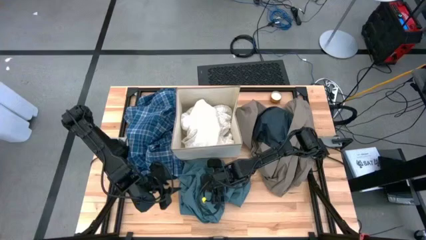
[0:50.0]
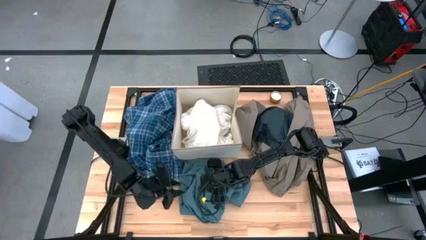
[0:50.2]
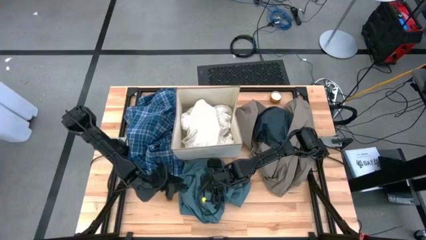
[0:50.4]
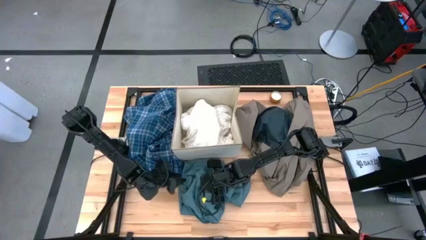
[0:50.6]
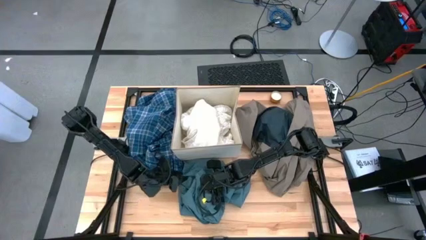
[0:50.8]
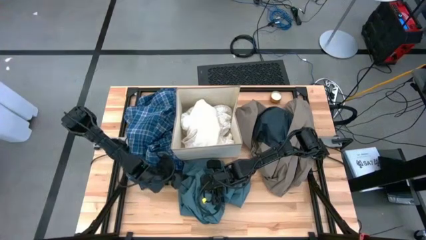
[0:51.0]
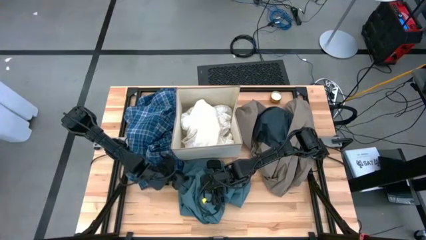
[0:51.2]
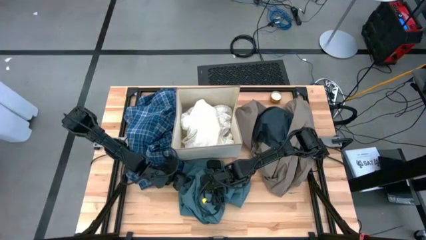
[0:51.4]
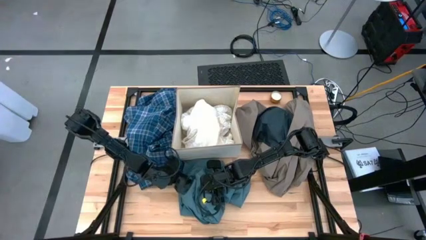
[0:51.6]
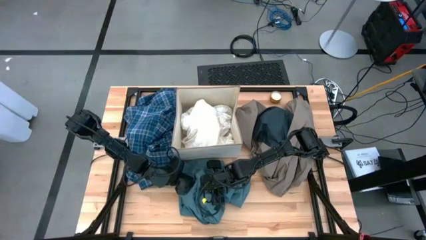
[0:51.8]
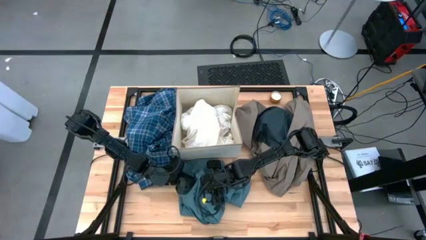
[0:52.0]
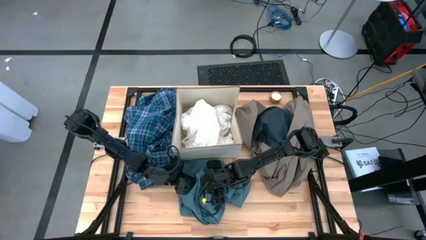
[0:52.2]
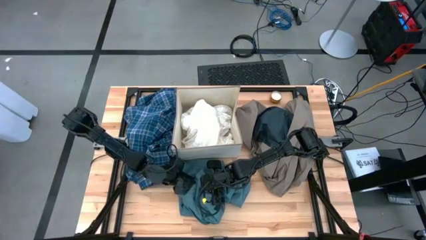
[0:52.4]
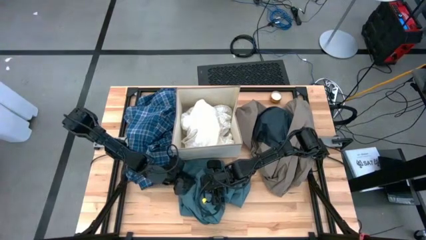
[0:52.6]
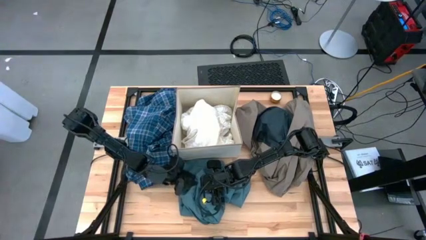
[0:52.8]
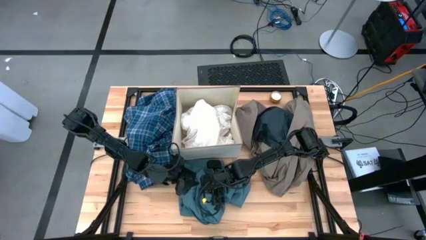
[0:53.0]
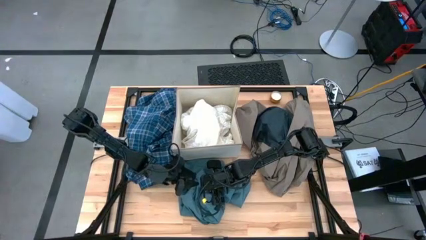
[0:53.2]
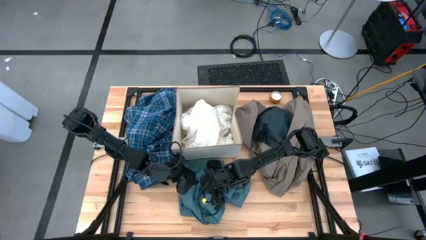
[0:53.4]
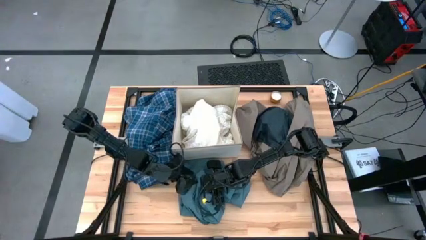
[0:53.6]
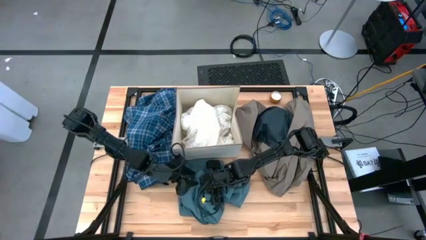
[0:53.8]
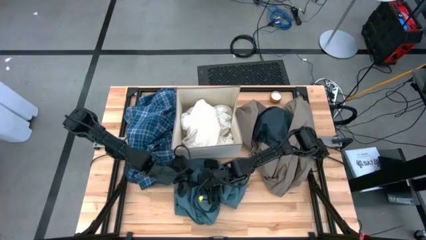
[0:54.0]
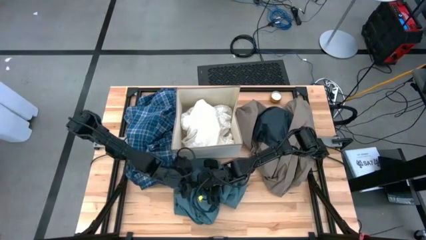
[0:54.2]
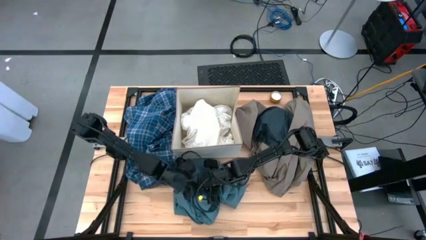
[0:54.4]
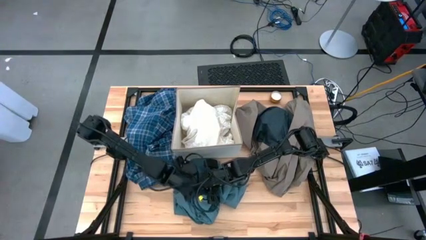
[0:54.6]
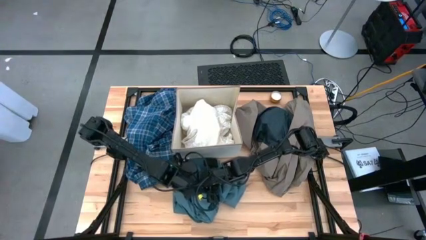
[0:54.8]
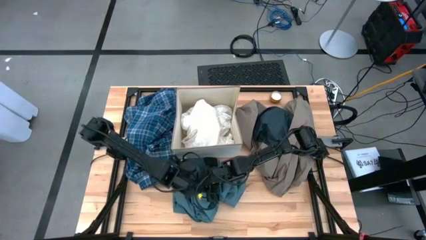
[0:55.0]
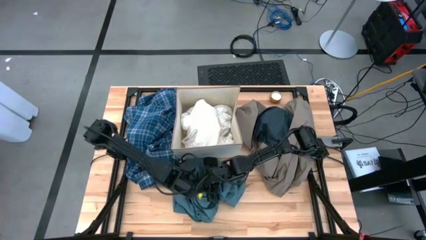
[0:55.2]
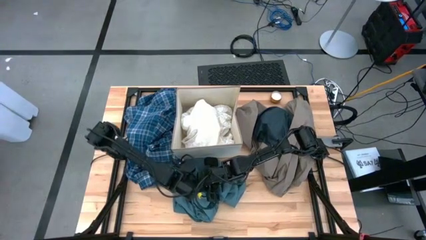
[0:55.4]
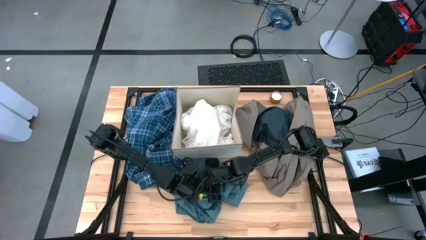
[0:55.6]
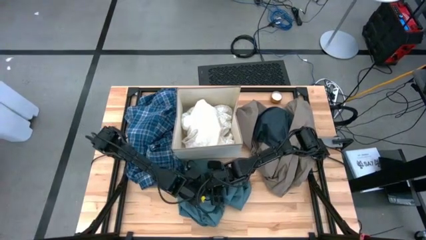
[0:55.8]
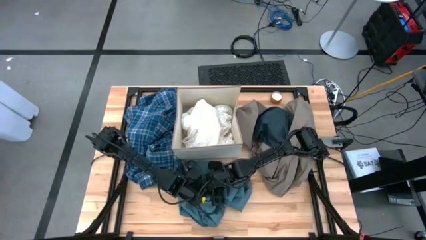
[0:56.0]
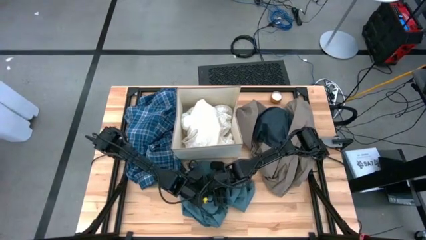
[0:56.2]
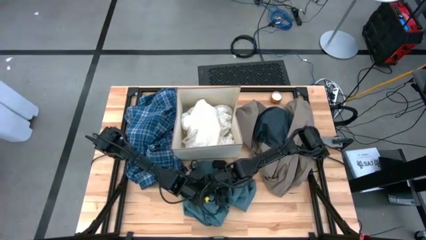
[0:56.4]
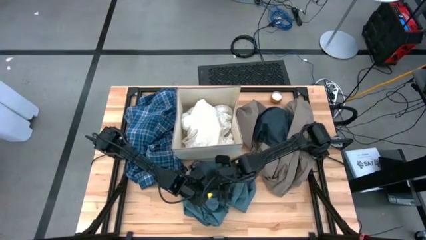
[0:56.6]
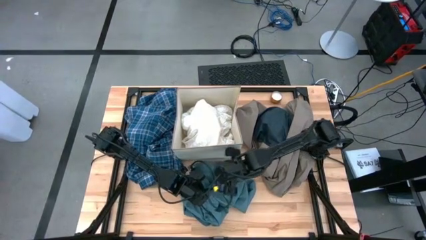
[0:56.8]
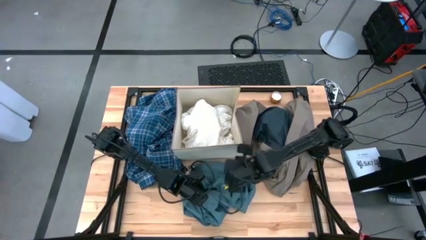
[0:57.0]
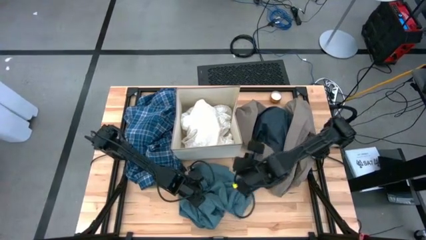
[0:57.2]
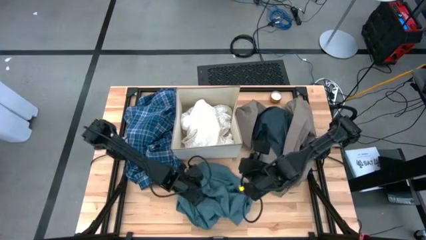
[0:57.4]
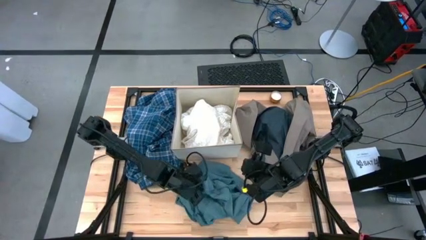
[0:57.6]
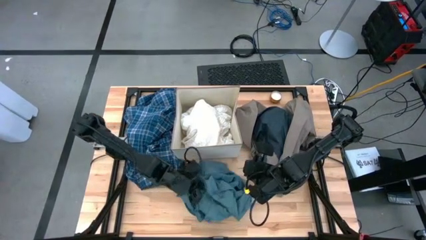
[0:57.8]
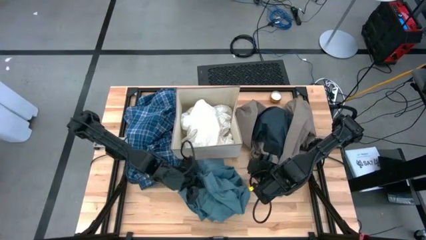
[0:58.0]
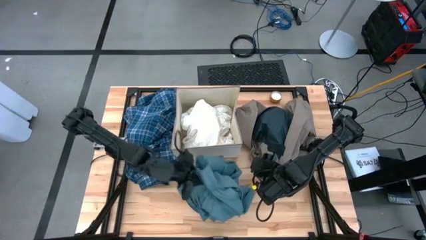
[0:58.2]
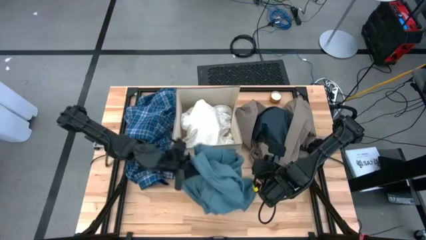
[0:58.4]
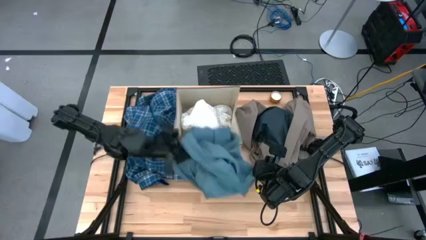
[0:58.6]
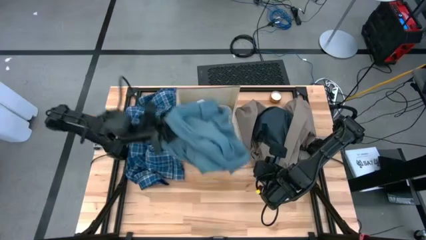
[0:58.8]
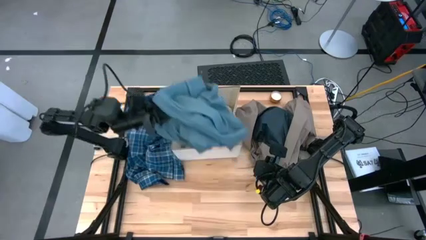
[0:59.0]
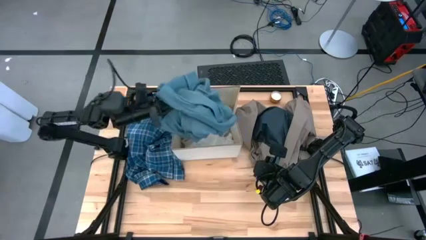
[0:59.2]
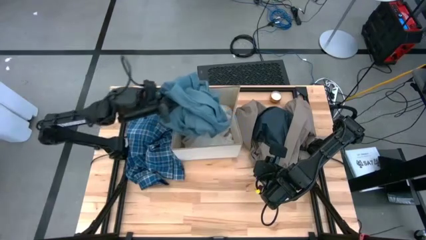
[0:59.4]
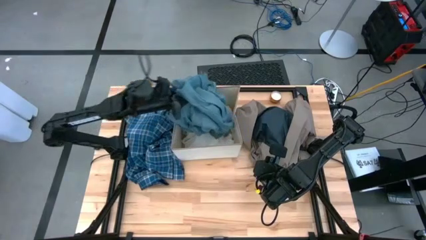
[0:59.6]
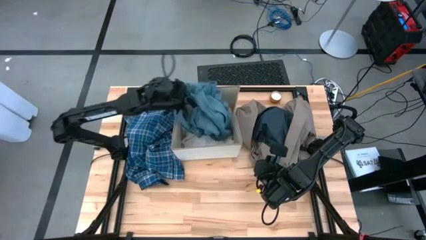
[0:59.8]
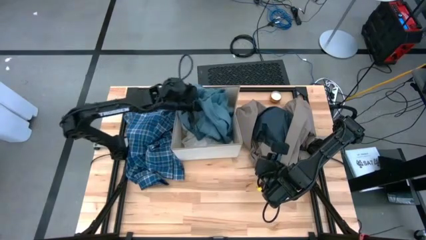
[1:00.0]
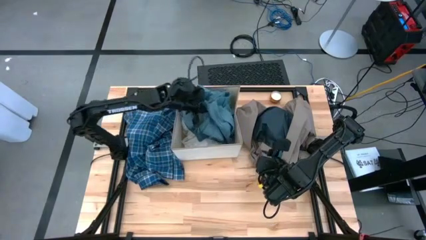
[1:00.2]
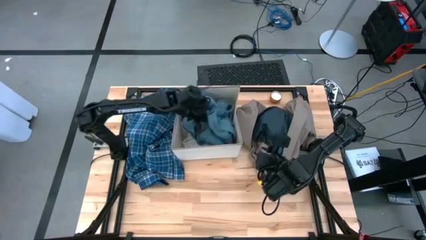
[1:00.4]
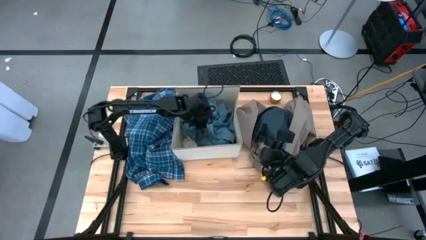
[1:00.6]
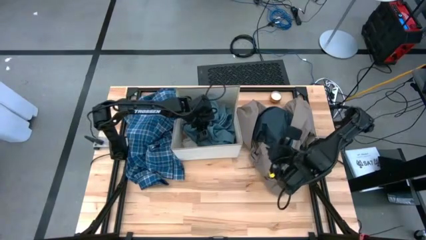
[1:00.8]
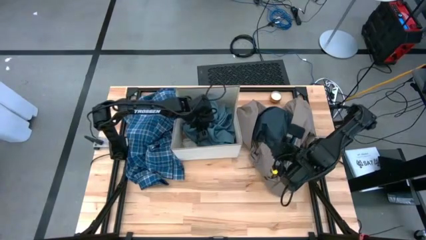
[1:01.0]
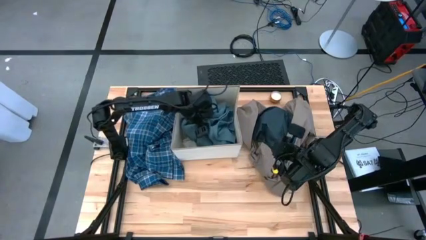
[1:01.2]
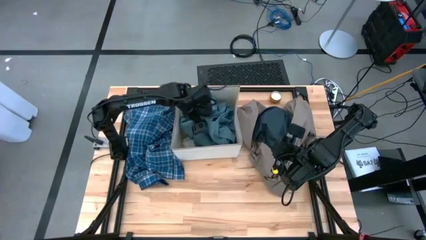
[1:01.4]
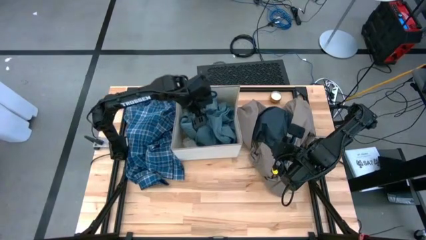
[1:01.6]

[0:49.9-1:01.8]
Task: Sort clothes
Put the blue, green pants into the laundry organizer
